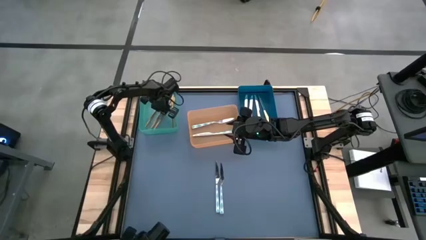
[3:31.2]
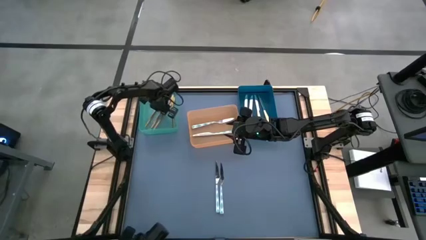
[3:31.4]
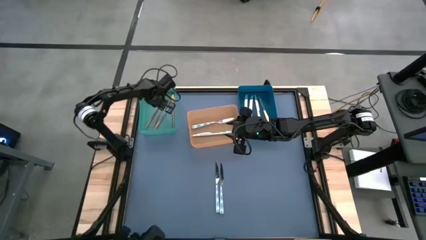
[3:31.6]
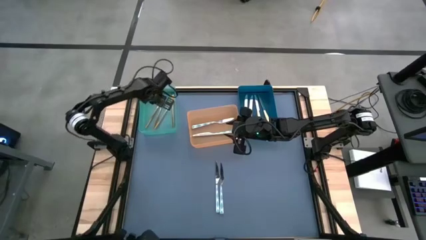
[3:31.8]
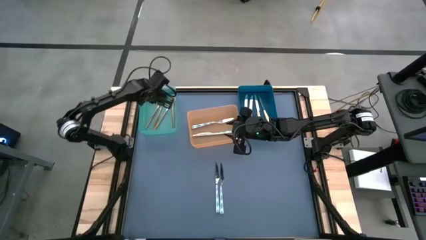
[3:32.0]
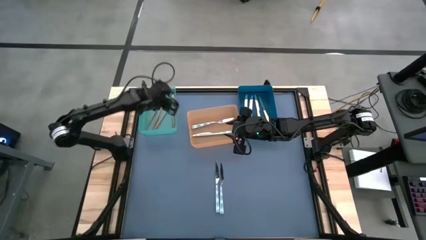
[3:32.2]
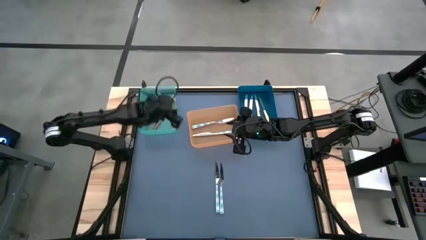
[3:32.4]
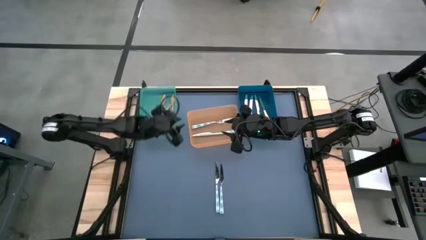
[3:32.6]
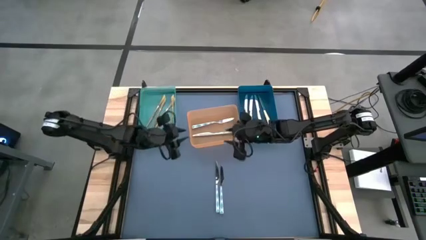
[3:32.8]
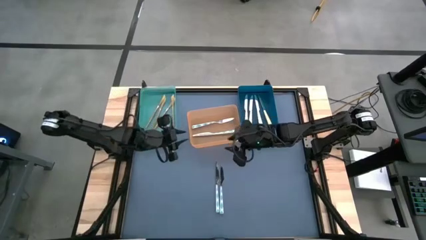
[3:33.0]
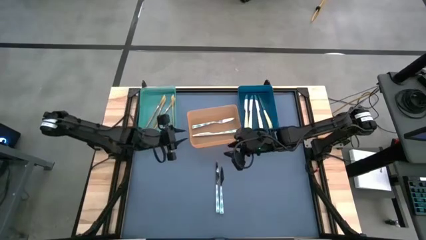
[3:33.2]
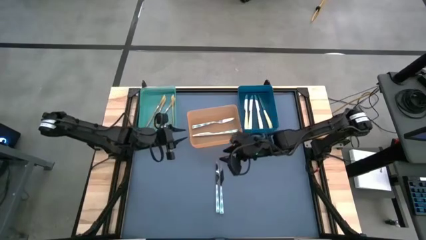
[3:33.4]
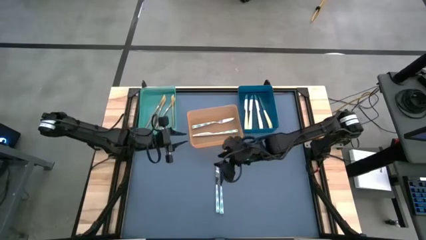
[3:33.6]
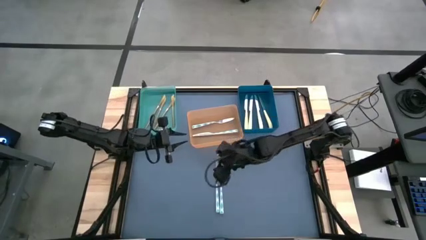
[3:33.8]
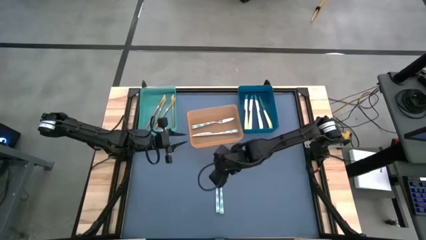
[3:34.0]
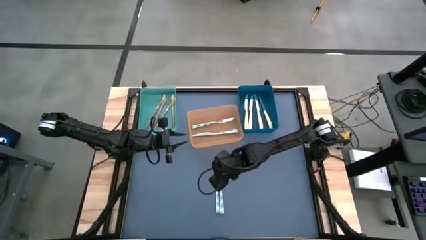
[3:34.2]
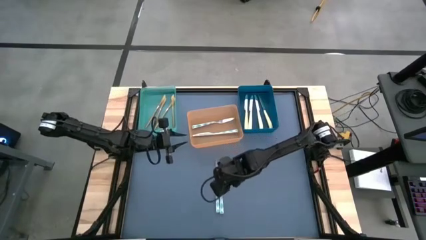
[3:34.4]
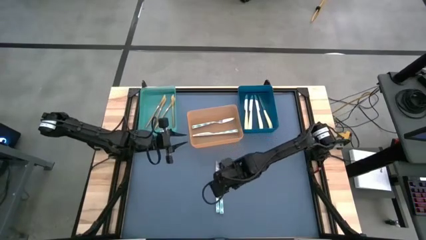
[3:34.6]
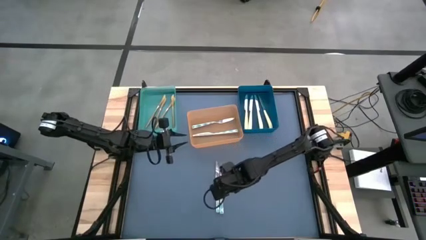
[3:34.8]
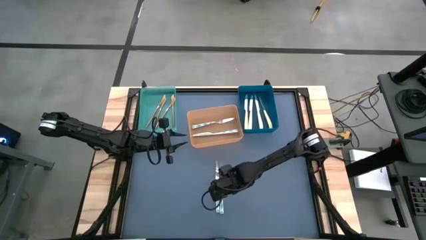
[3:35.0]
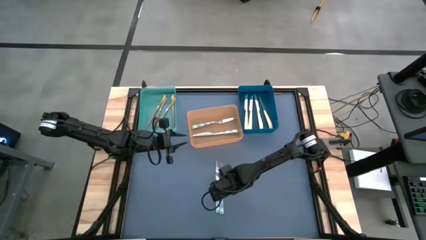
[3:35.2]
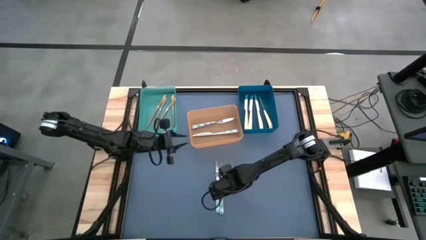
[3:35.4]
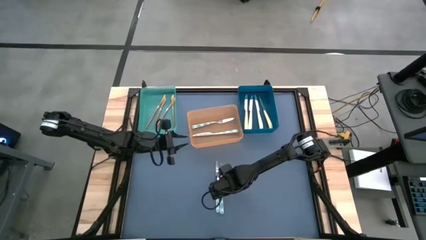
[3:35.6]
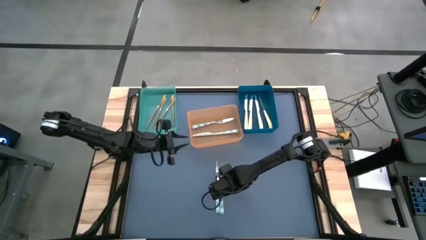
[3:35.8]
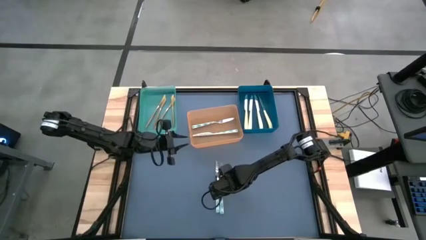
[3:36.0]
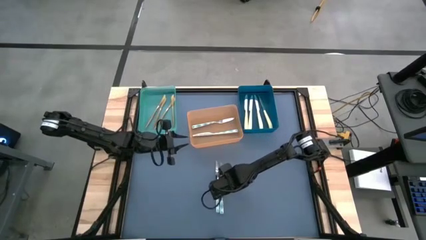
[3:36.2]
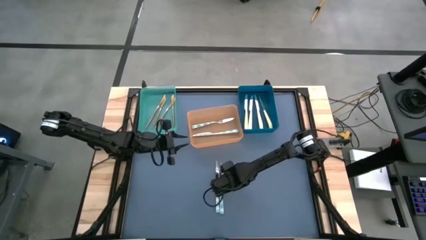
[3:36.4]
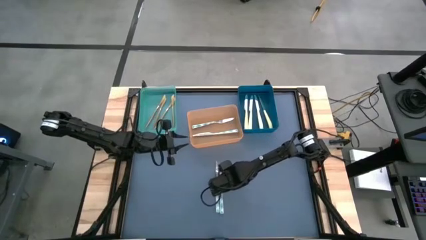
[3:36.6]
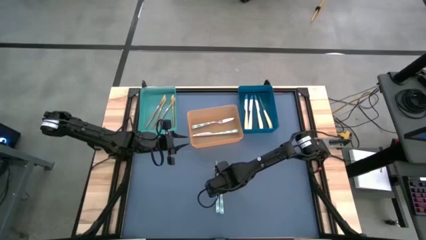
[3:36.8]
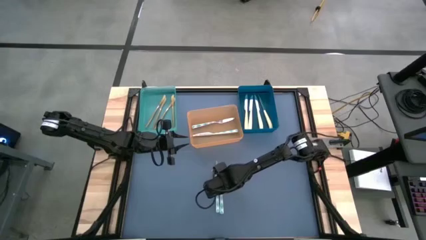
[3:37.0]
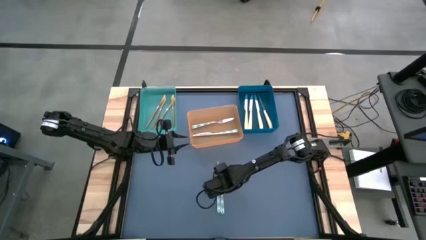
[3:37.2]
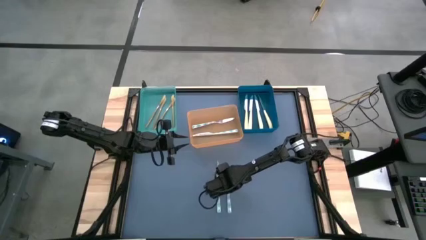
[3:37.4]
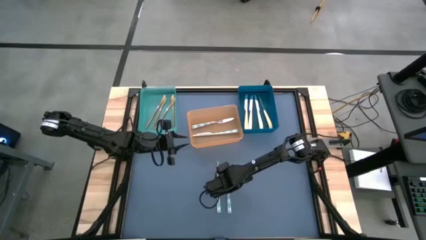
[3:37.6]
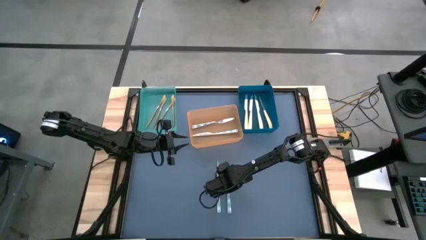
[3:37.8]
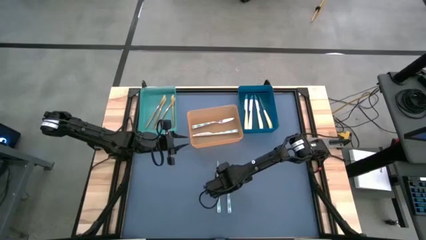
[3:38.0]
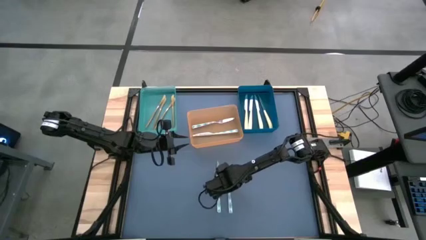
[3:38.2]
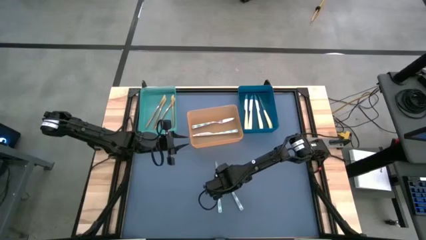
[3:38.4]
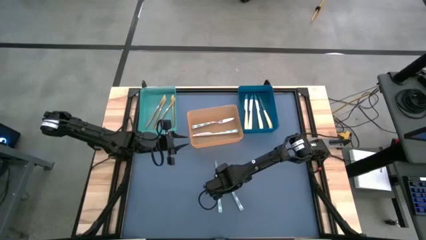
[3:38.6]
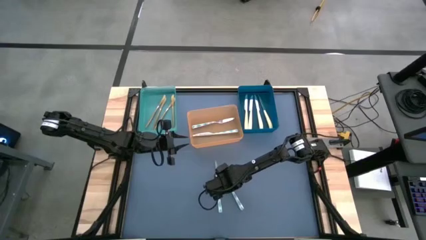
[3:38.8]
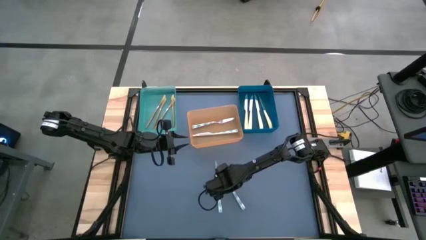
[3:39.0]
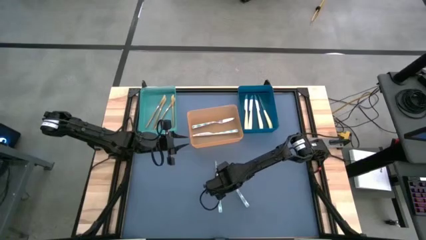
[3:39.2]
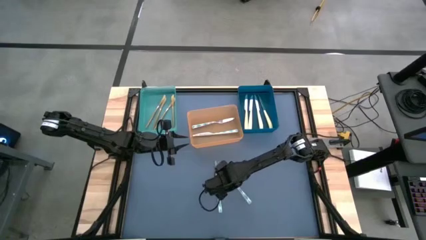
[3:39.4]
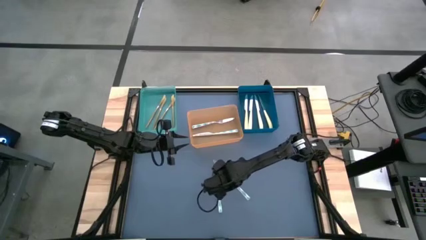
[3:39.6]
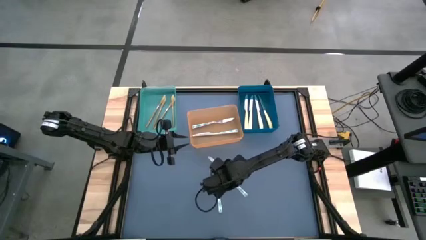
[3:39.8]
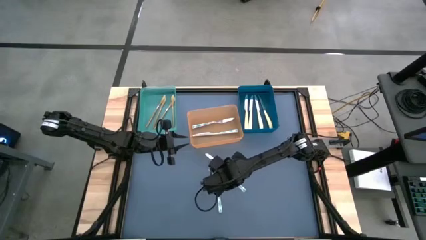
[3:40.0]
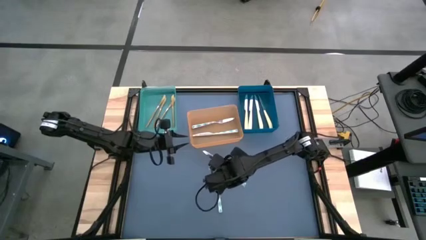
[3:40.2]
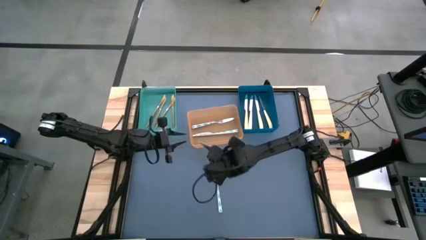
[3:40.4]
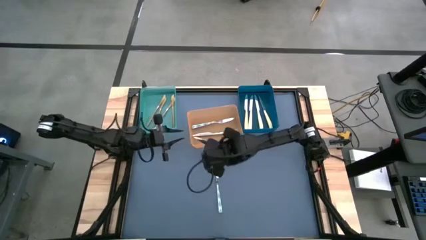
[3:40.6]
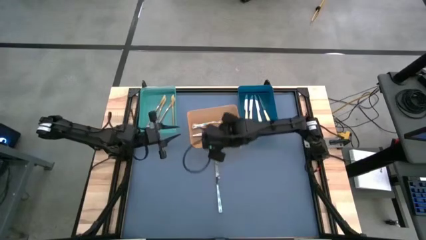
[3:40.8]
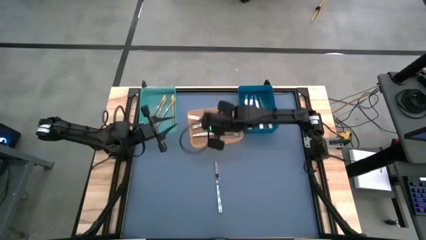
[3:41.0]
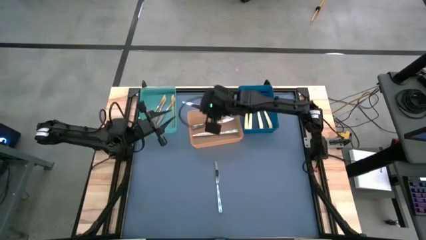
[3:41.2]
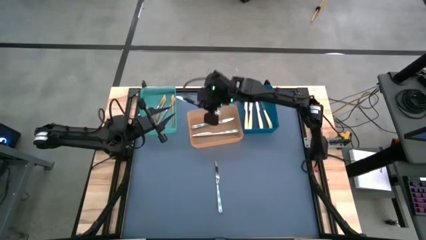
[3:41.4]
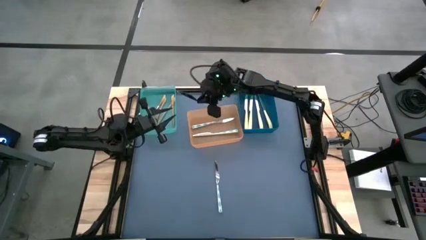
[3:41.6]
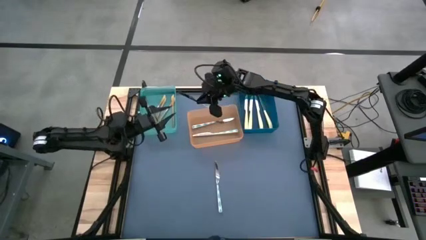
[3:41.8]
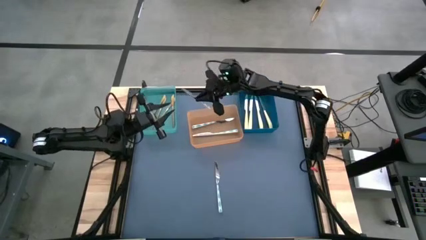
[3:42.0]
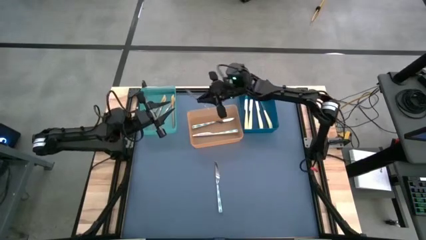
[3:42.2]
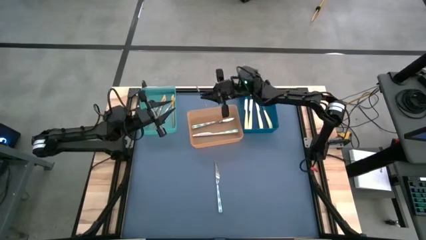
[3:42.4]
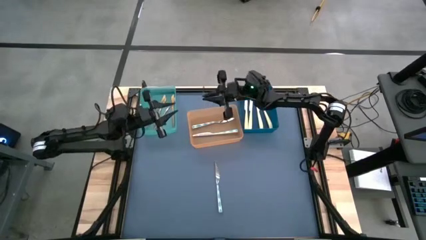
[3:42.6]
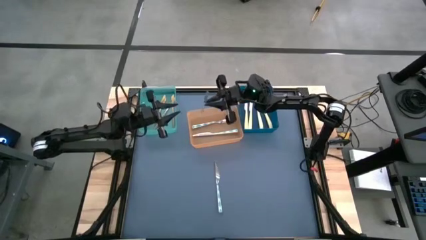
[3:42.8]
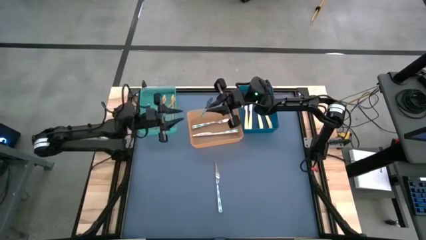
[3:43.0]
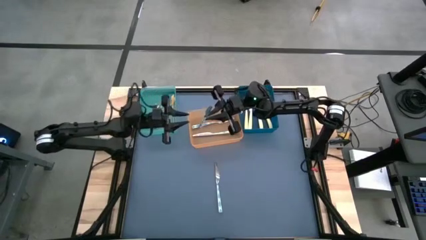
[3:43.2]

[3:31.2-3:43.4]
Task: Sort silverware by color (type)
Put the white knife in the orange bin

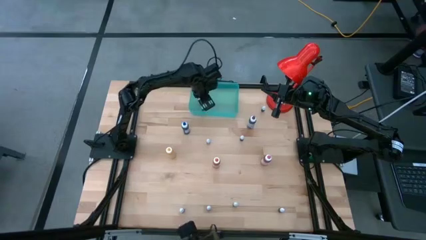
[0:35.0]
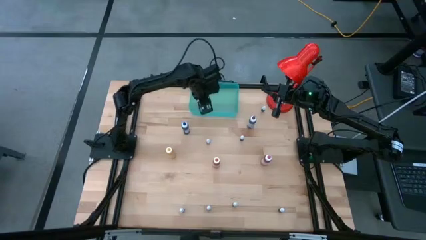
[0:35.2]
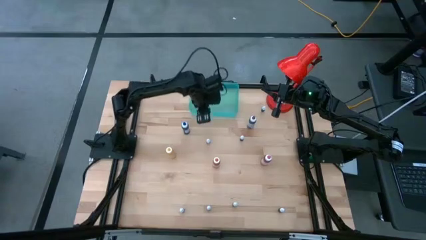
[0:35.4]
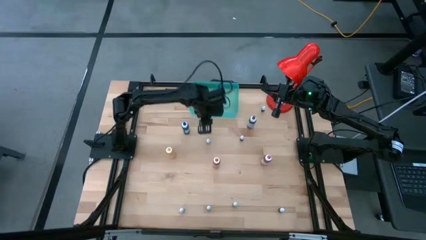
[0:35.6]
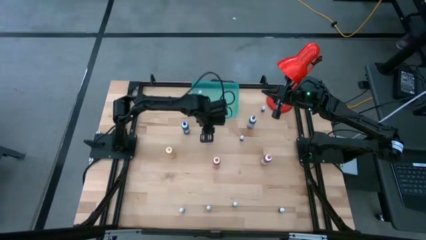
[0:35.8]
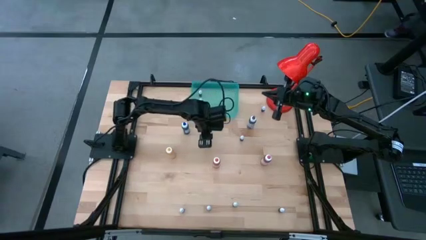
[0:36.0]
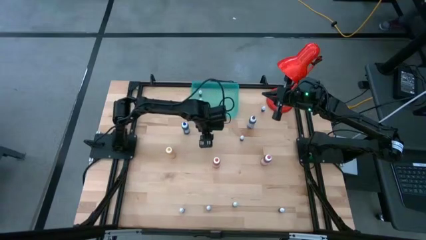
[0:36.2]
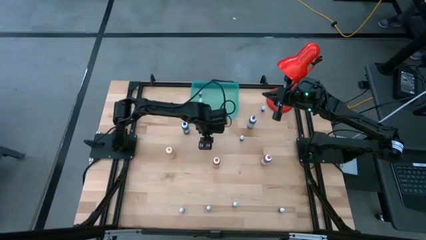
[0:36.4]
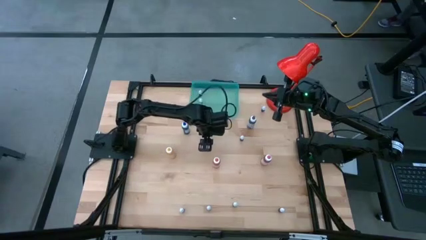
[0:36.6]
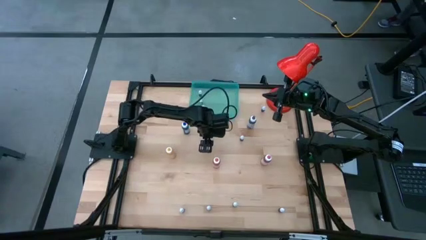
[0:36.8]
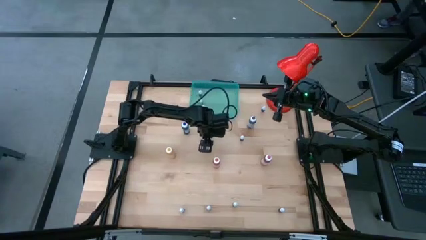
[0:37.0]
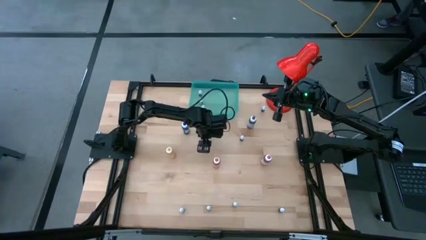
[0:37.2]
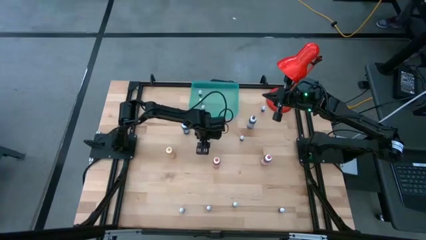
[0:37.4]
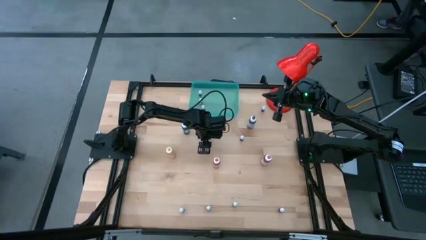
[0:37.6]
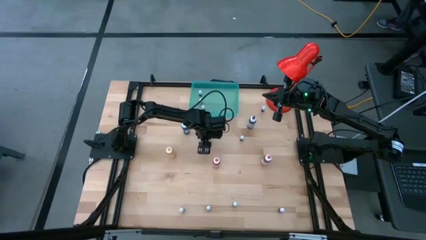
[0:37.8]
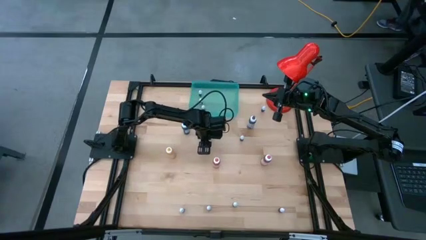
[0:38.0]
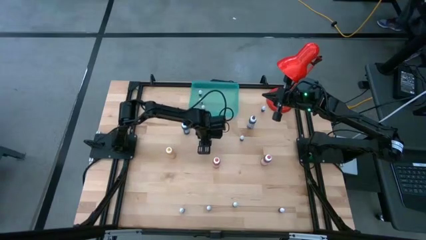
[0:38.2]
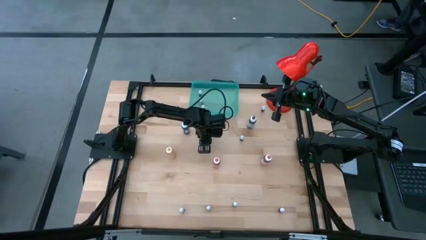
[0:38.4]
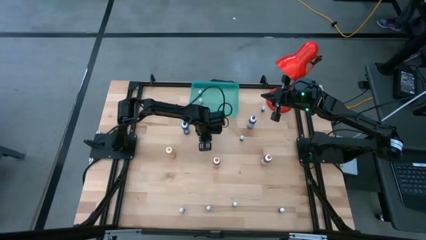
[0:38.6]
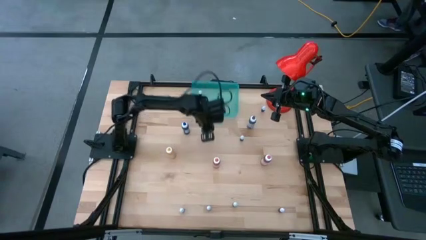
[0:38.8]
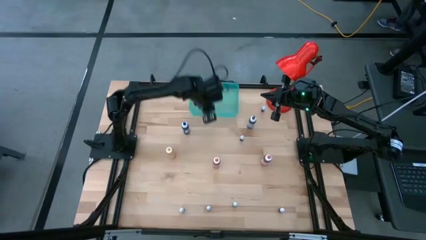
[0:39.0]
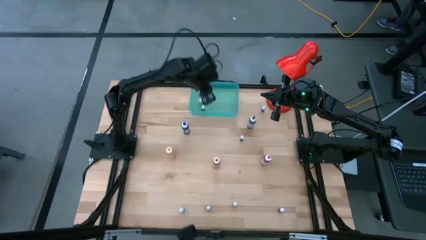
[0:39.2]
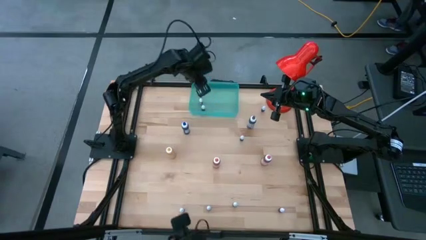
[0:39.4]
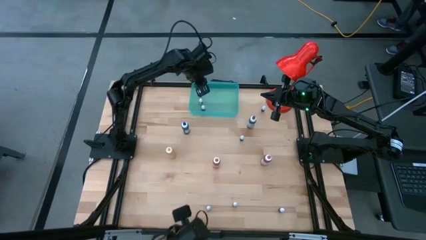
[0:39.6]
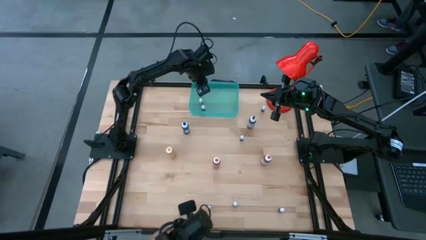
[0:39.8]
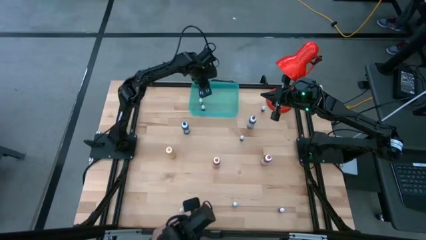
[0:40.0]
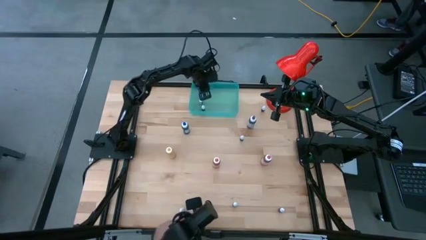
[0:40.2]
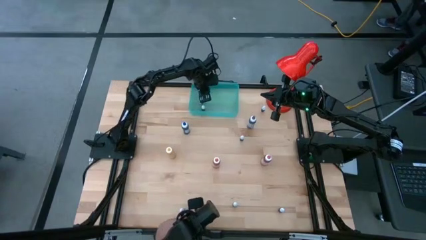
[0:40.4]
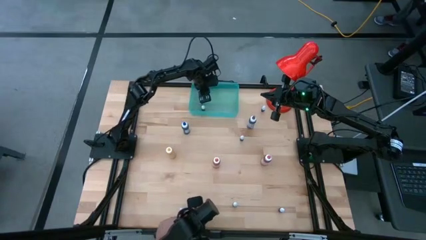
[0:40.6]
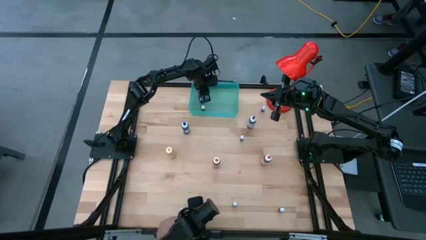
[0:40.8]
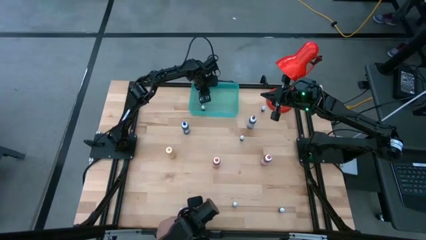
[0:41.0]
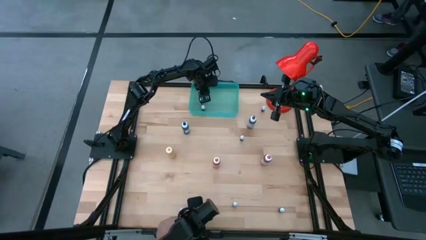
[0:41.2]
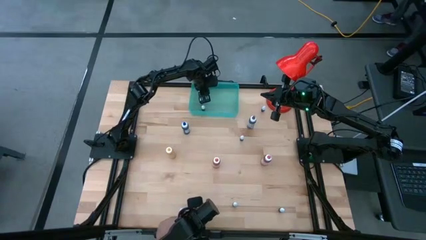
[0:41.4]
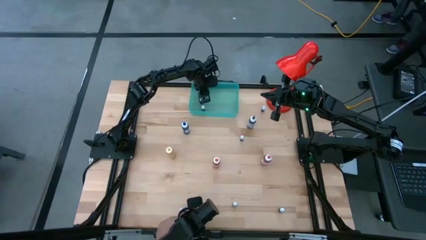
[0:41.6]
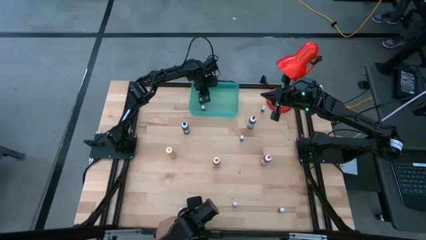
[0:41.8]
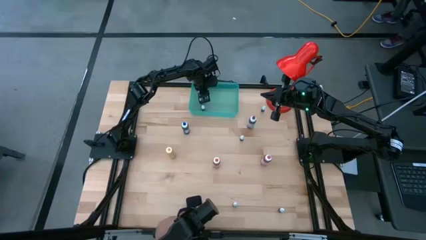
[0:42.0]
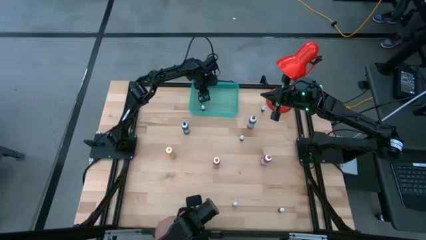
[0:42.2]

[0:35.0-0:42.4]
Task: Pick & Place food coloring
Put the top central black food coloring bottle into the bin
